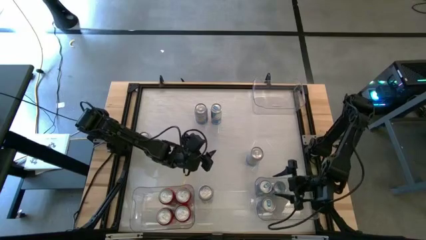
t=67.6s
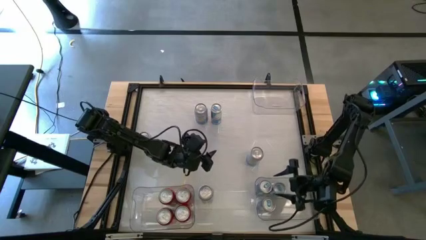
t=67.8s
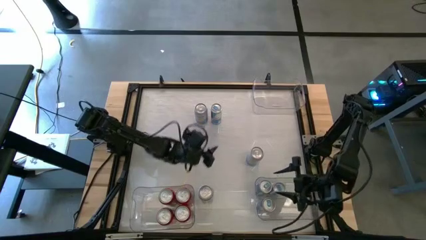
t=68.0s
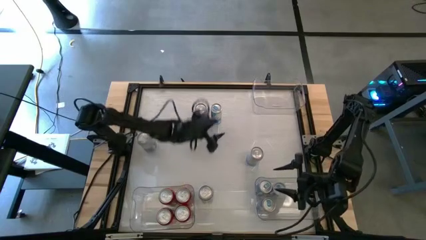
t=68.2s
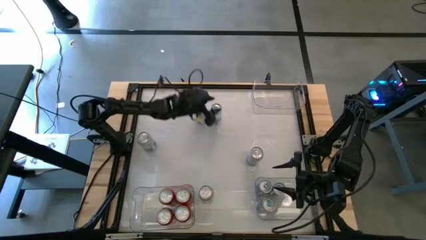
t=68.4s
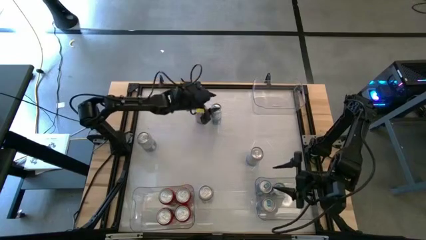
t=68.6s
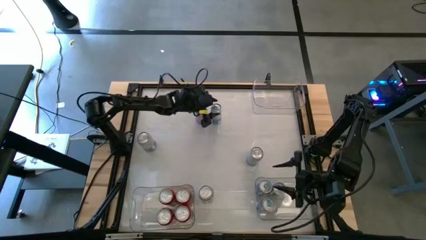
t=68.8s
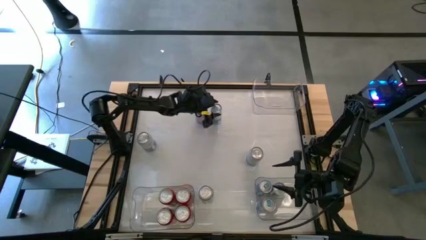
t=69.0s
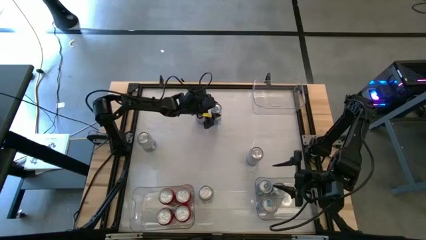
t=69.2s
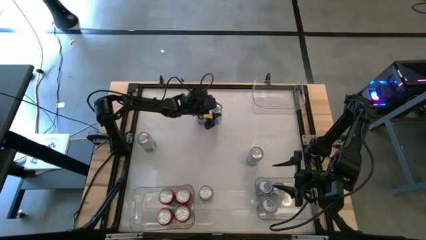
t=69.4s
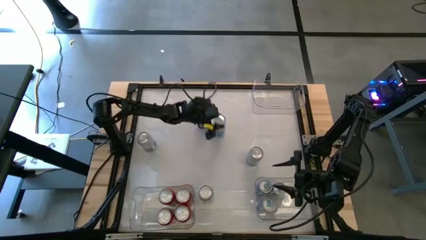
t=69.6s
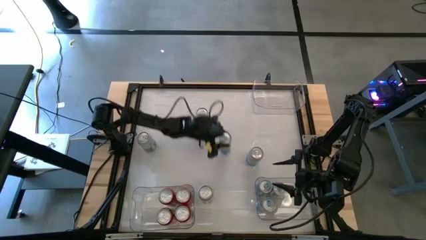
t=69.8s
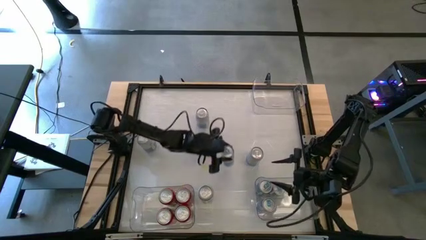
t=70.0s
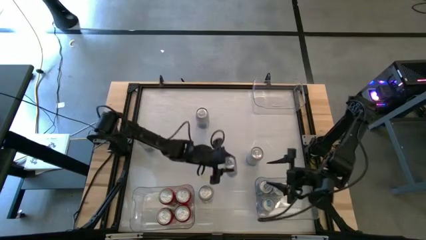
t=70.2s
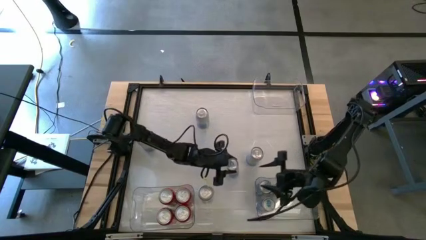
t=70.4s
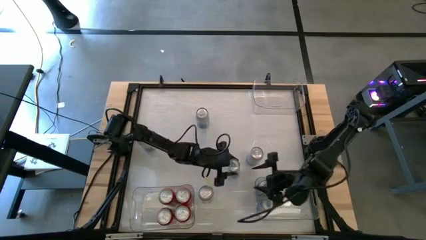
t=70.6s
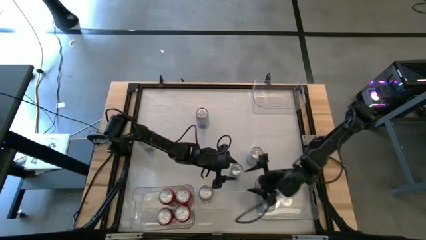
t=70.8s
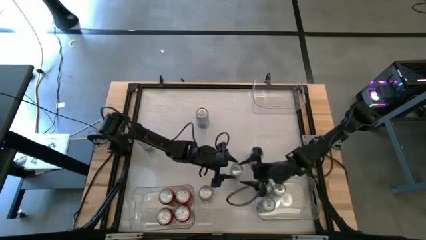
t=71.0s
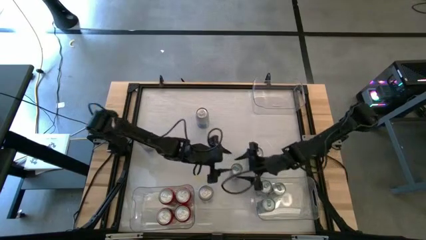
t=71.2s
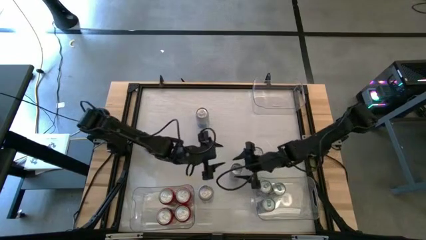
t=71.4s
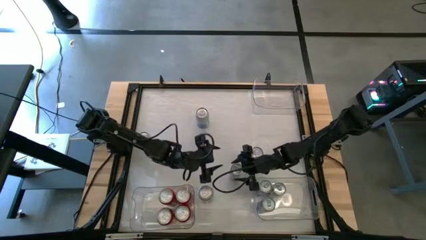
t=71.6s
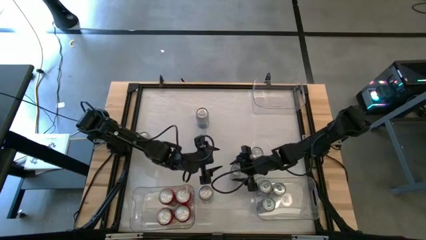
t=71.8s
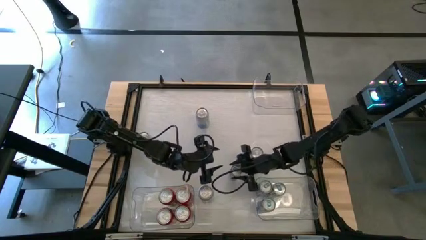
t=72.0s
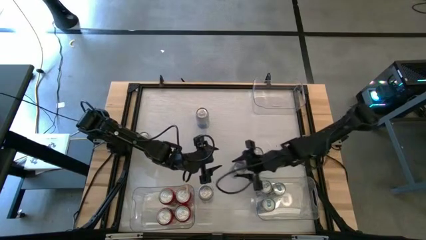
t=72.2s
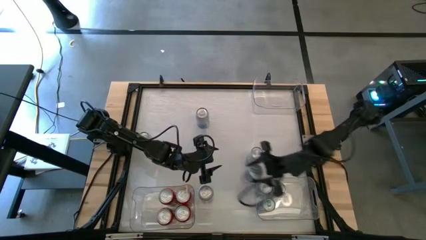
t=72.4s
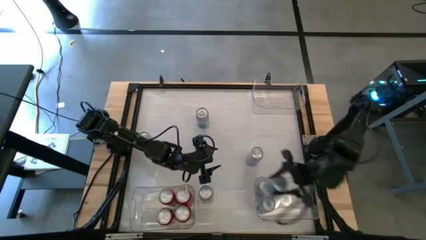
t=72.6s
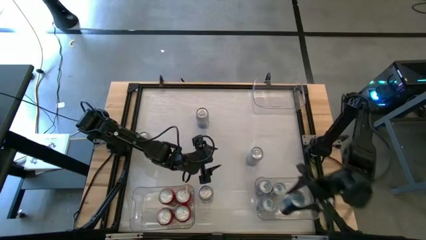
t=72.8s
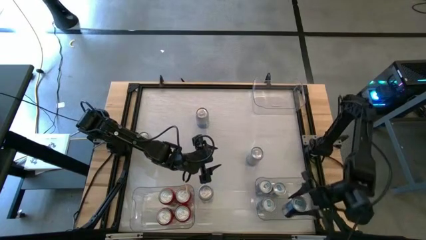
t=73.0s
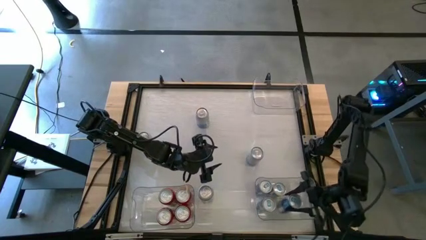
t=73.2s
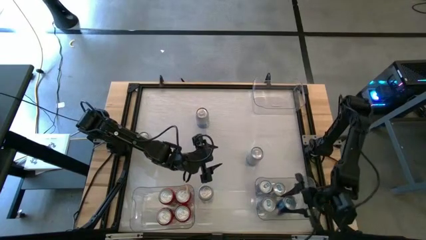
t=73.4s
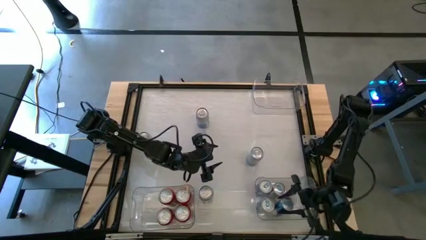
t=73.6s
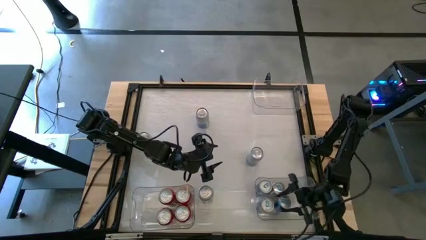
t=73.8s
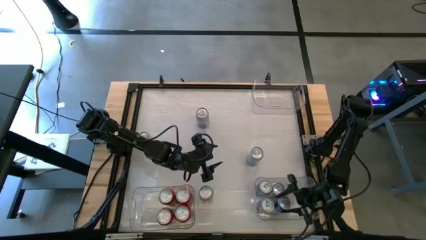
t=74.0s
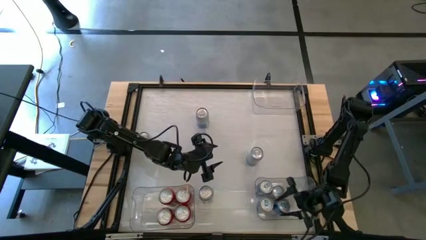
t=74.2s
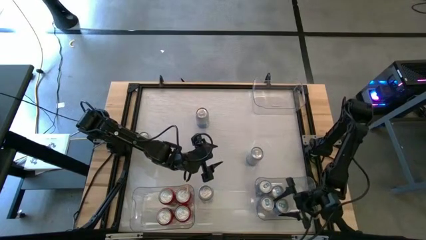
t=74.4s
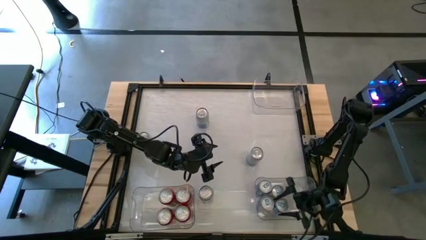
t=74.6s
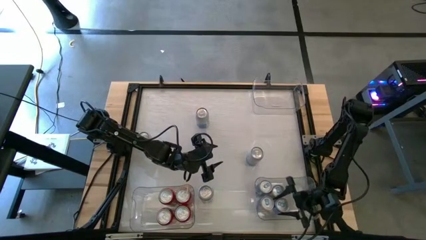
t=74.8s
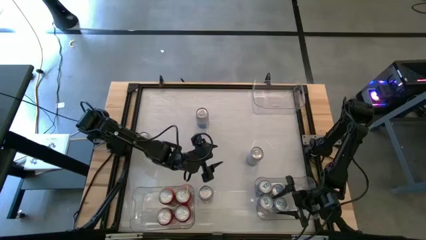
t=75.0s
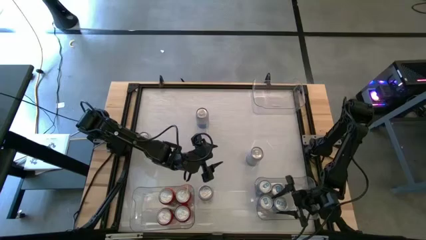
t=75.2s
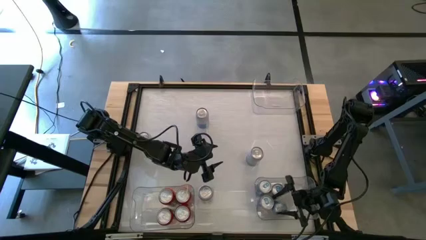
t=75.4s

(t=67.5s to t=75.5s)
Task: Sort soda cans
Put the blue soda can into the bottom right transparent bin

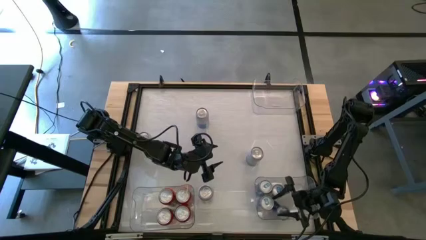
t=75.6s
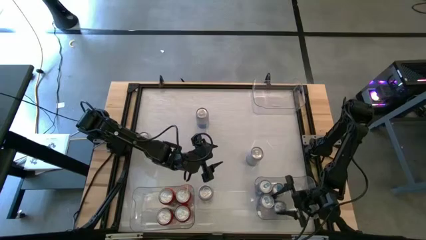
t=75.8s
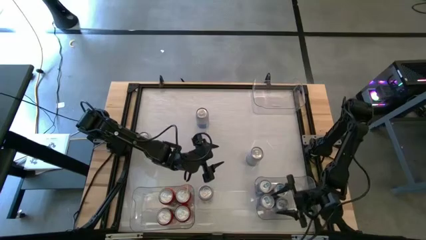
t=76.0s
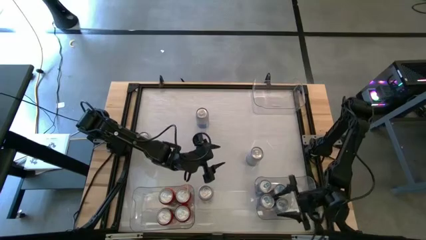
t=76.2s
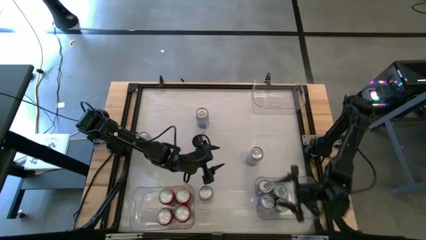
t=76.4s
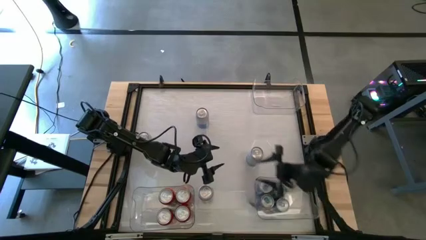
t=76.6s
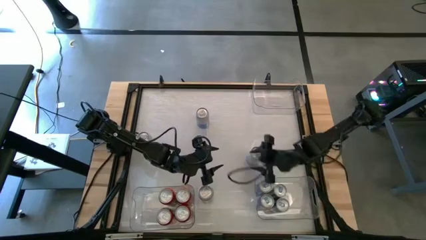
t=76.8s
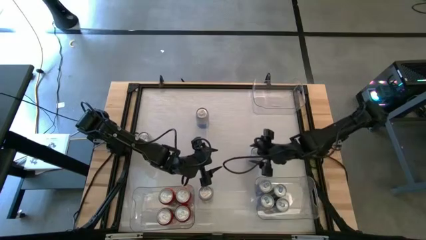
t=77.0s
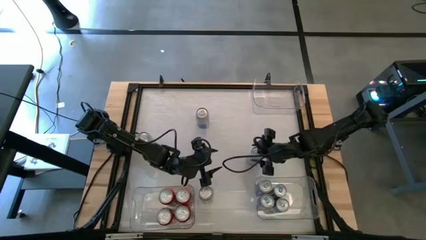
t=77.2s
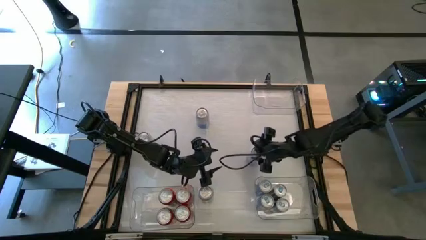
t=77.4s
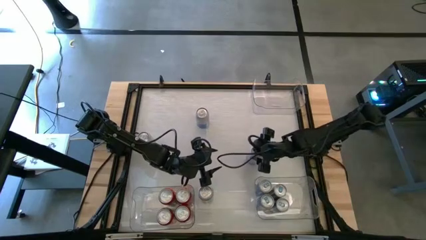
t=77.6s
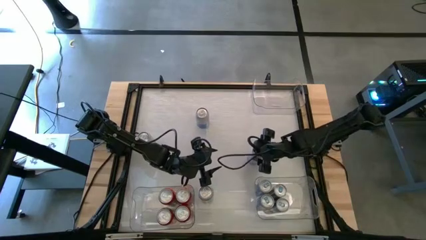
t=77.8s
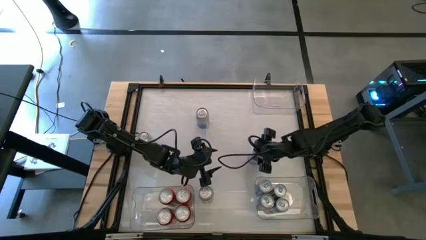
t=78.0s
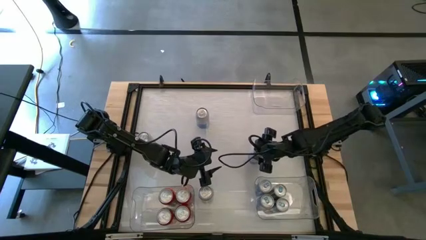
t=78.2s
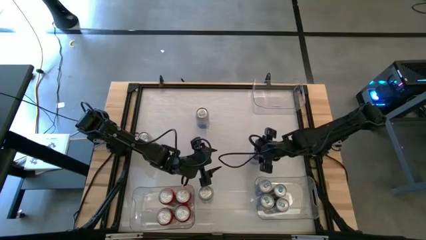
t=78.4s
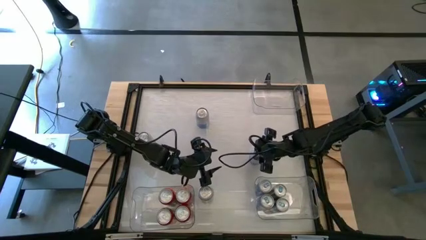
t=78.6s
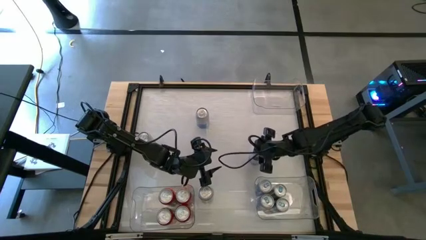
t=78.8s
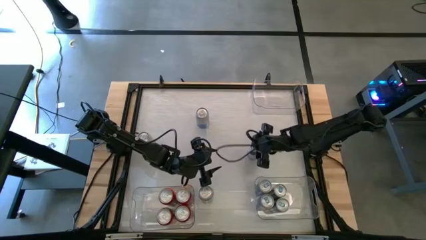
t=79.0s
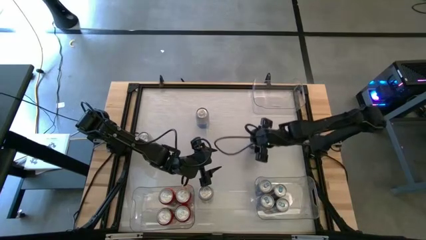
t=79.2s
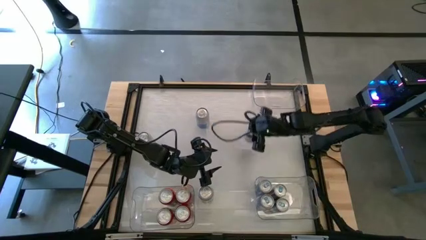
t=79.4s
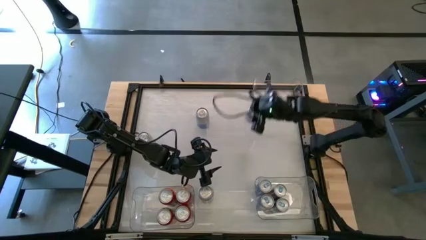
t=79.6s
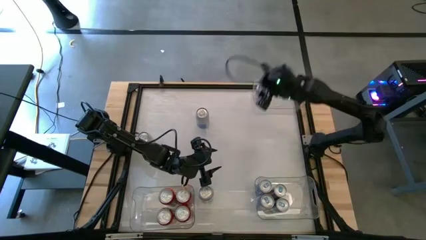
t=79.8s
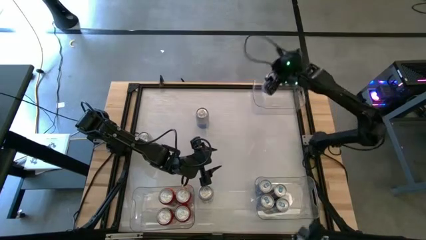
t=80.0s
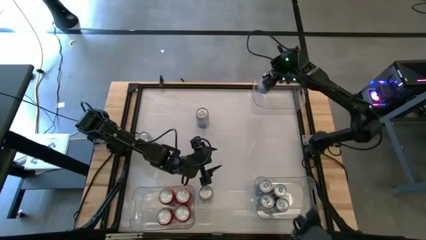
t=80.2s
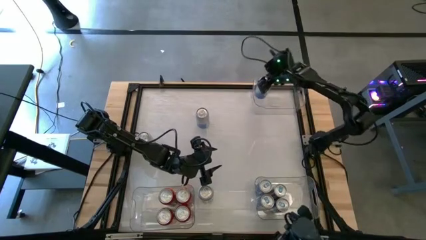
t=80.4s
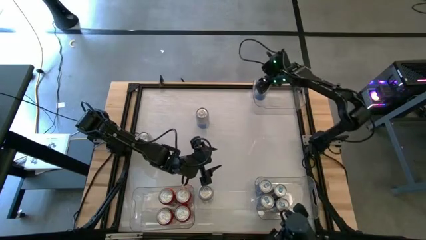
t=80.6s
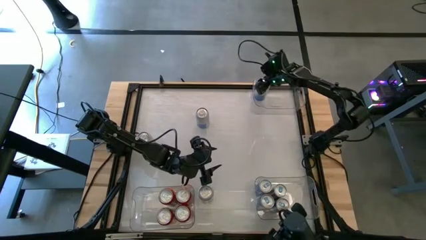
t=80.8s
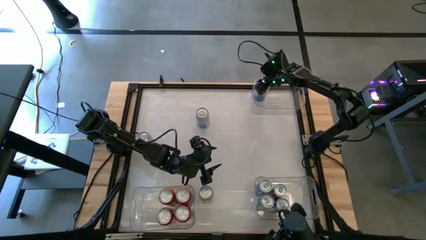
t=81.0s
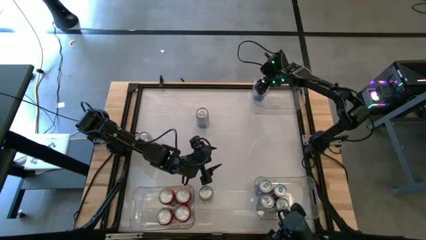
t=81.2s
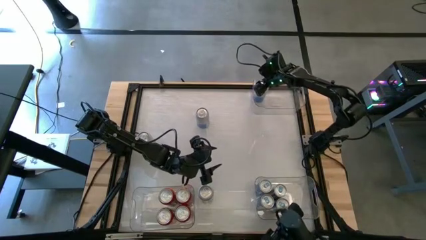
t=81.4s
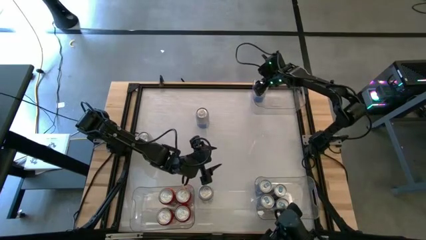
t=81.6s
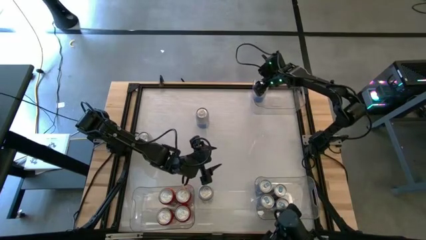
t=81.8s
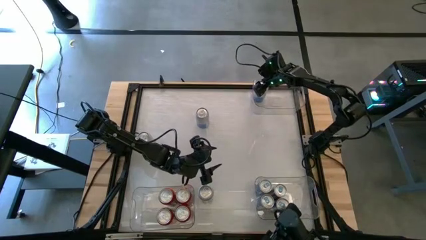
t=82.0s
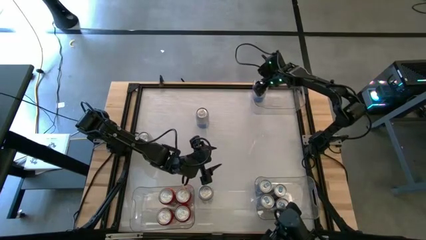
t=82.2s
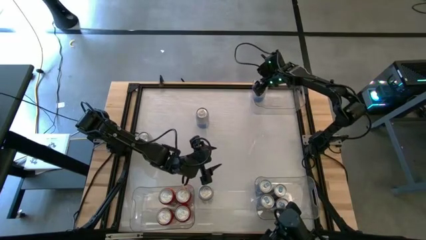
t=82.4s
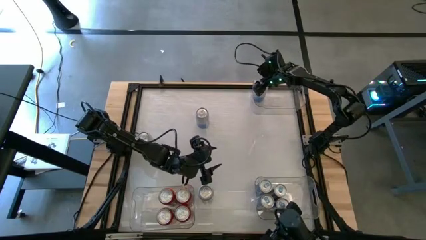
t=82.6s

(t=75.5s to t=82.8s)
Put the middle right blue-white soda can into the top right transparent bin
